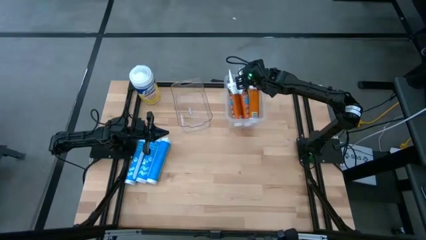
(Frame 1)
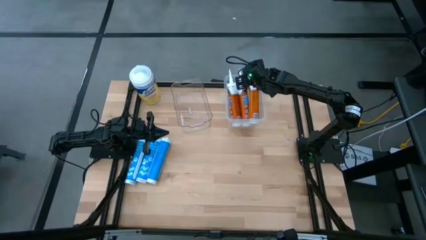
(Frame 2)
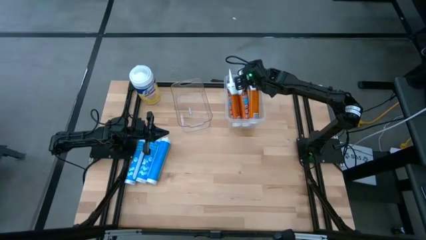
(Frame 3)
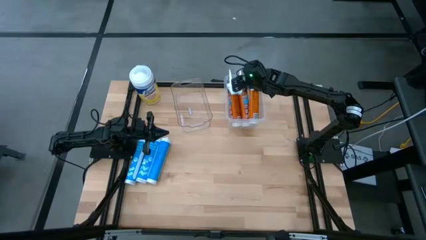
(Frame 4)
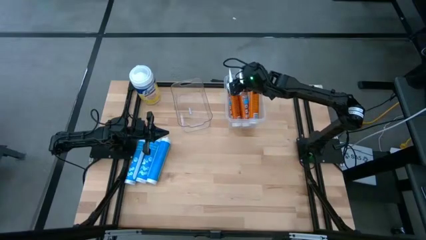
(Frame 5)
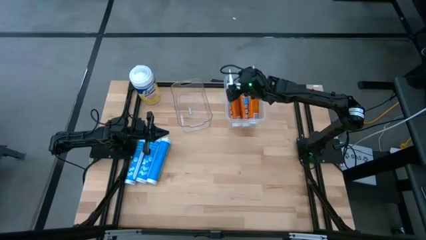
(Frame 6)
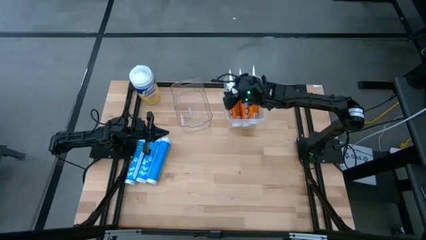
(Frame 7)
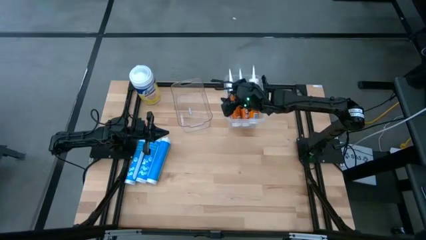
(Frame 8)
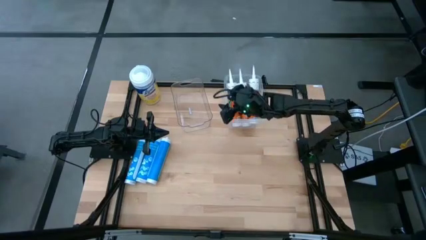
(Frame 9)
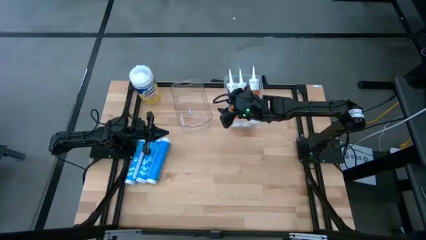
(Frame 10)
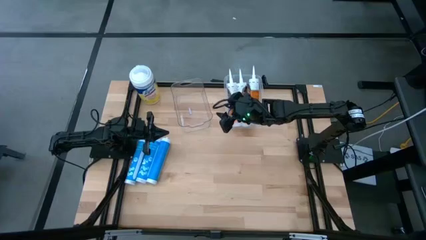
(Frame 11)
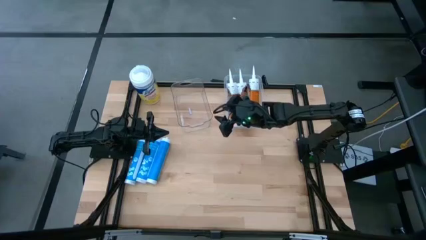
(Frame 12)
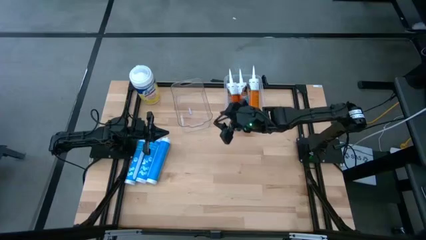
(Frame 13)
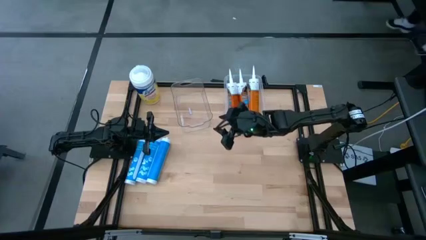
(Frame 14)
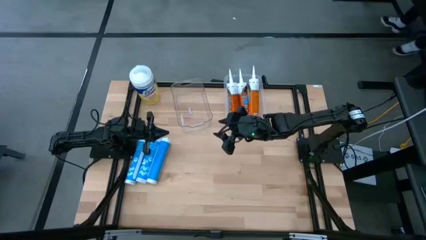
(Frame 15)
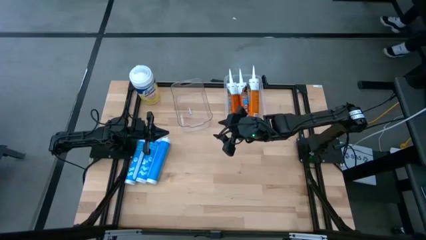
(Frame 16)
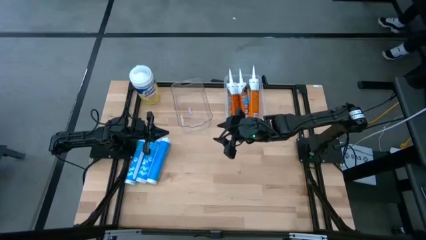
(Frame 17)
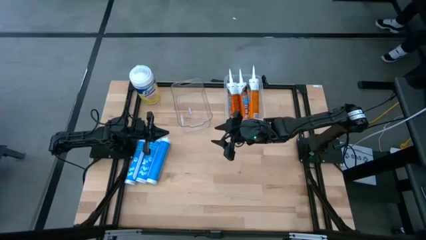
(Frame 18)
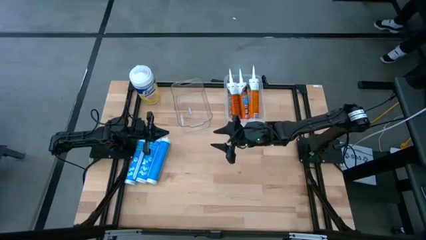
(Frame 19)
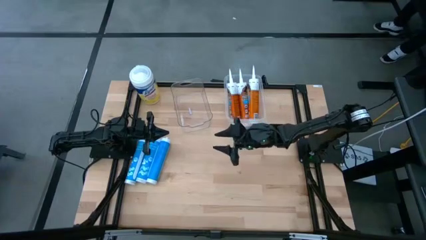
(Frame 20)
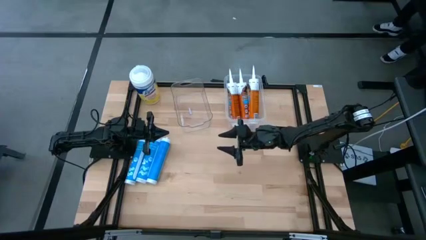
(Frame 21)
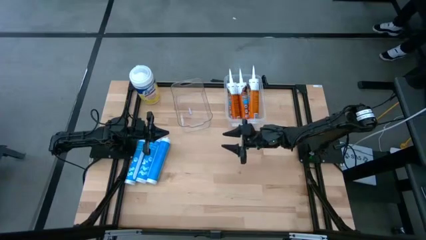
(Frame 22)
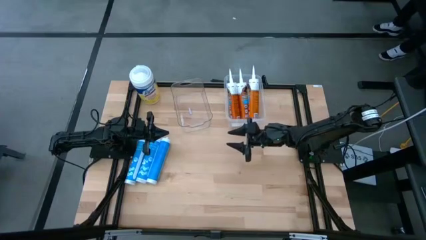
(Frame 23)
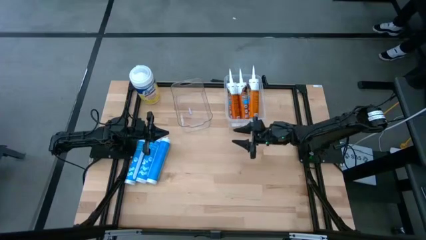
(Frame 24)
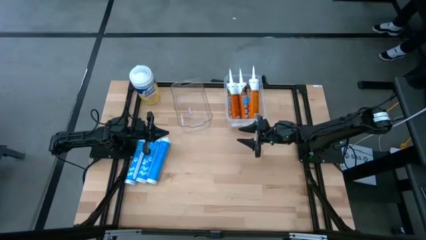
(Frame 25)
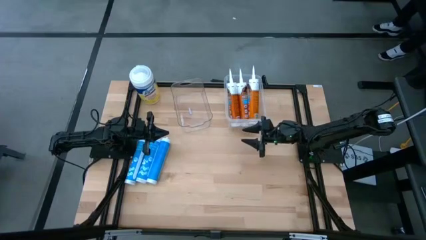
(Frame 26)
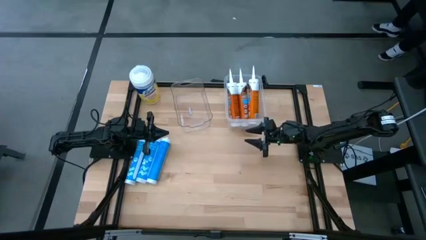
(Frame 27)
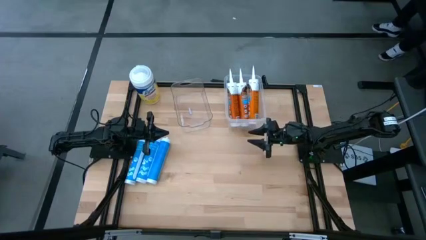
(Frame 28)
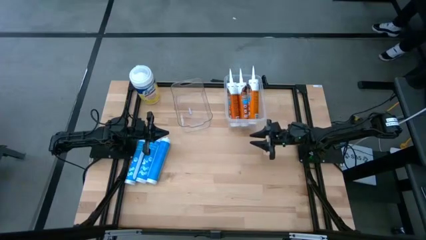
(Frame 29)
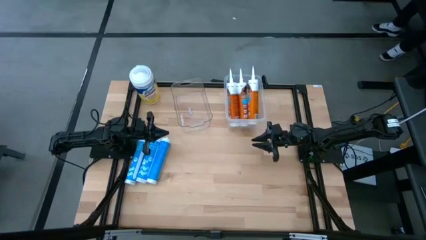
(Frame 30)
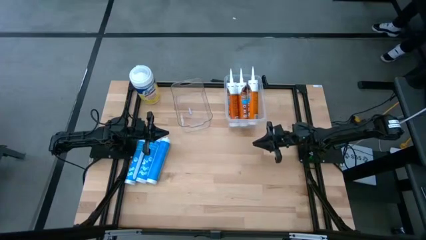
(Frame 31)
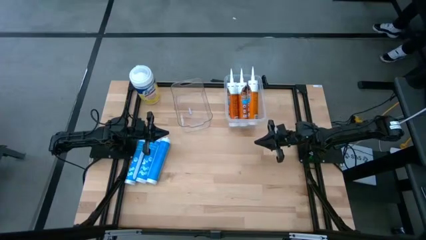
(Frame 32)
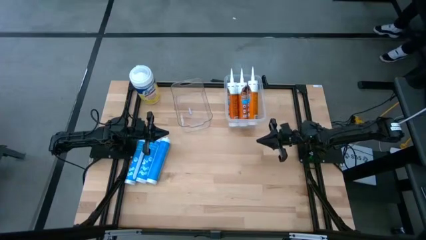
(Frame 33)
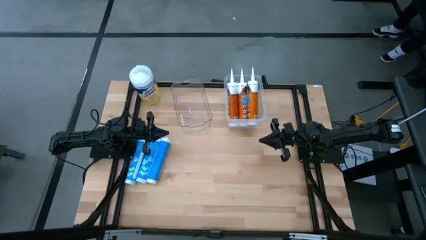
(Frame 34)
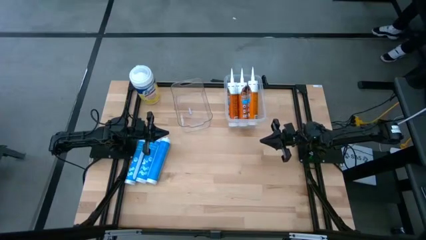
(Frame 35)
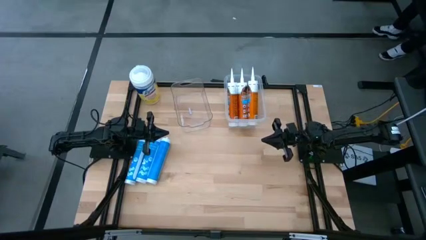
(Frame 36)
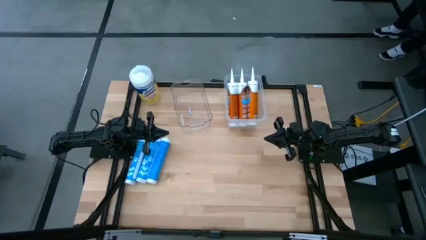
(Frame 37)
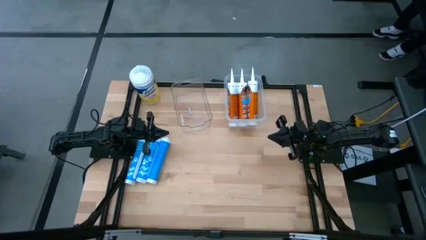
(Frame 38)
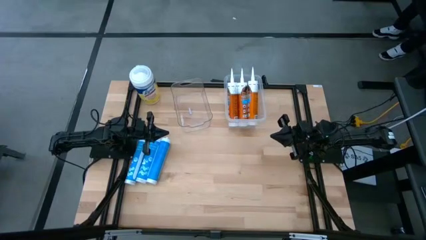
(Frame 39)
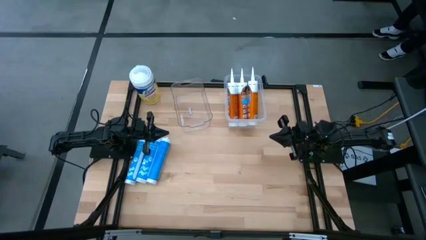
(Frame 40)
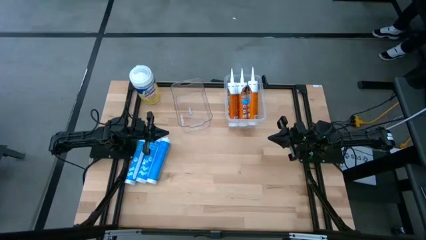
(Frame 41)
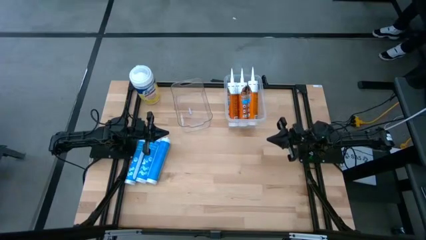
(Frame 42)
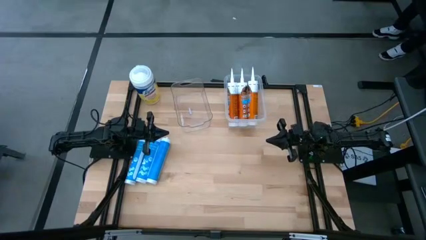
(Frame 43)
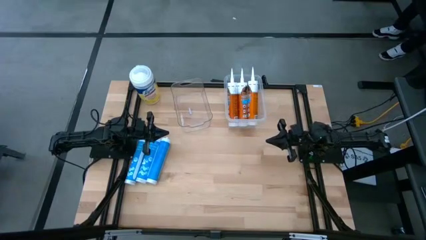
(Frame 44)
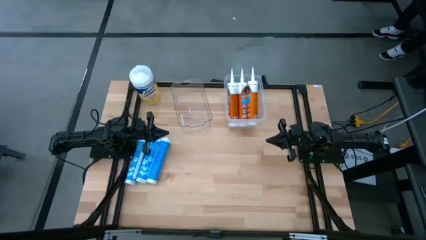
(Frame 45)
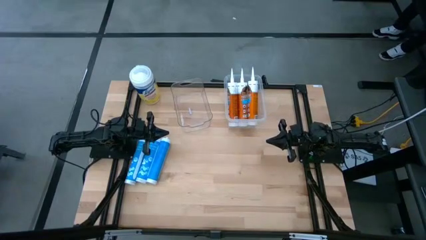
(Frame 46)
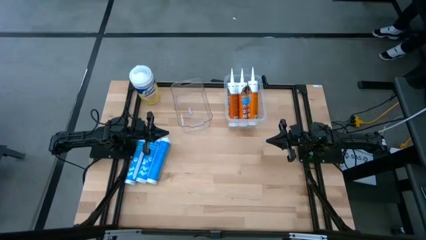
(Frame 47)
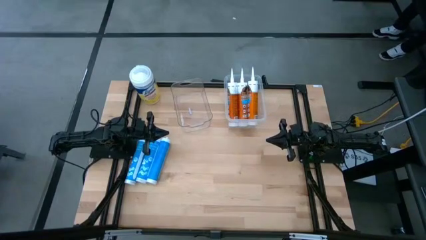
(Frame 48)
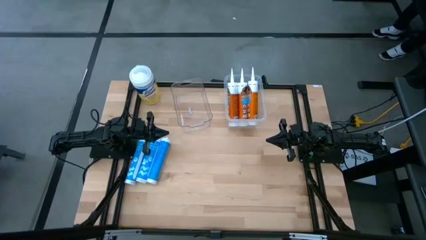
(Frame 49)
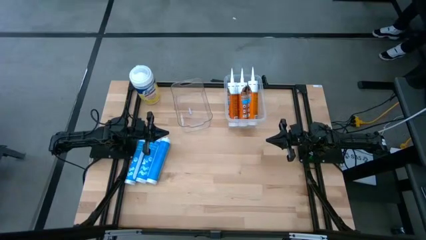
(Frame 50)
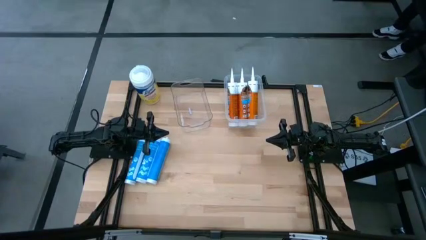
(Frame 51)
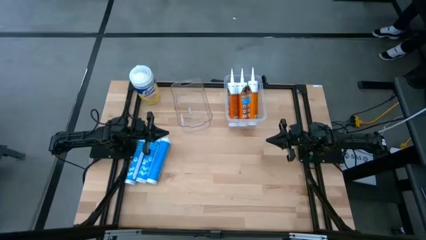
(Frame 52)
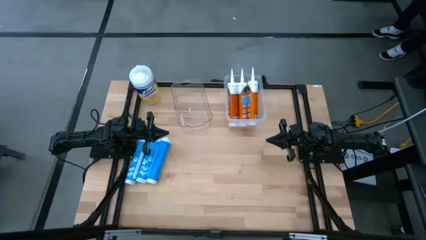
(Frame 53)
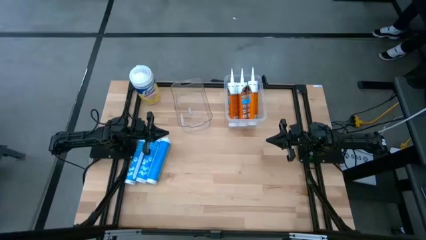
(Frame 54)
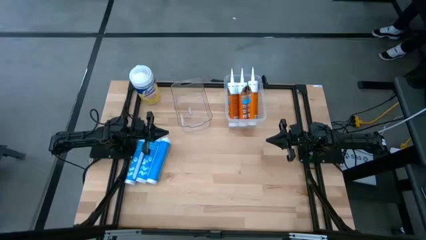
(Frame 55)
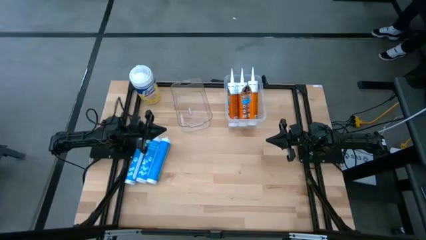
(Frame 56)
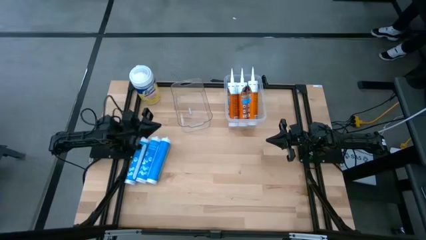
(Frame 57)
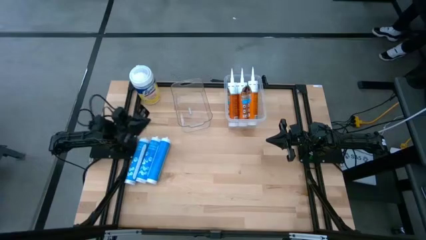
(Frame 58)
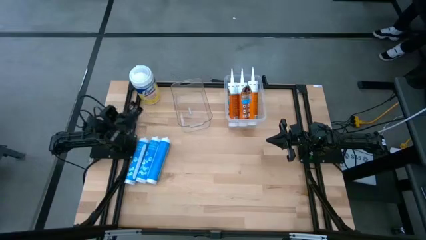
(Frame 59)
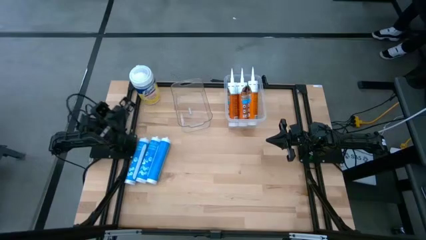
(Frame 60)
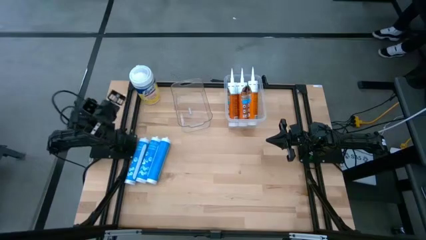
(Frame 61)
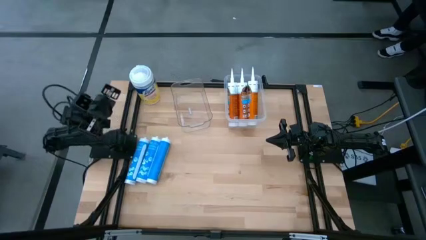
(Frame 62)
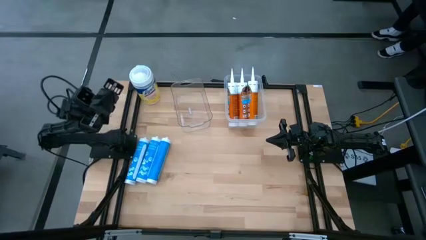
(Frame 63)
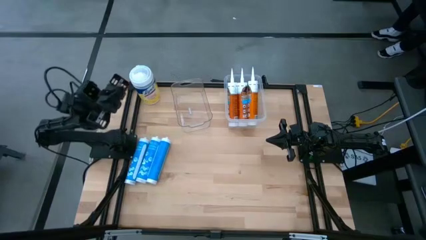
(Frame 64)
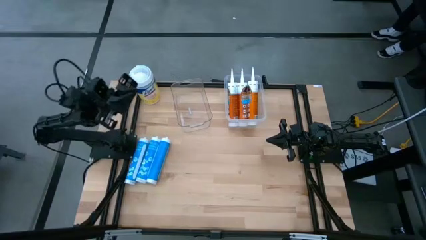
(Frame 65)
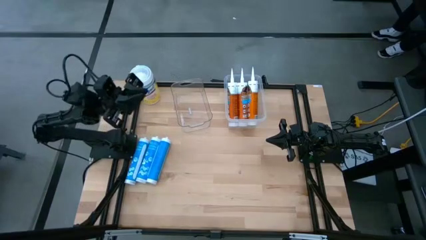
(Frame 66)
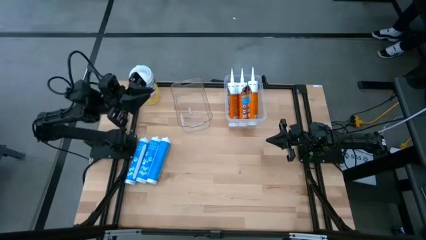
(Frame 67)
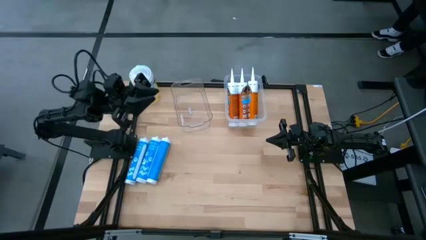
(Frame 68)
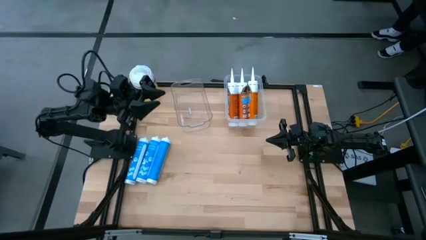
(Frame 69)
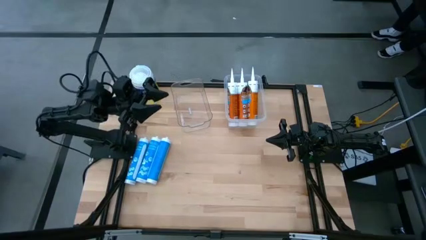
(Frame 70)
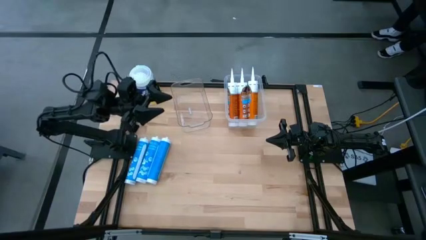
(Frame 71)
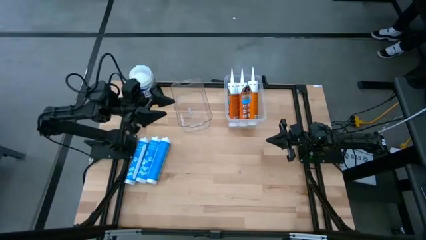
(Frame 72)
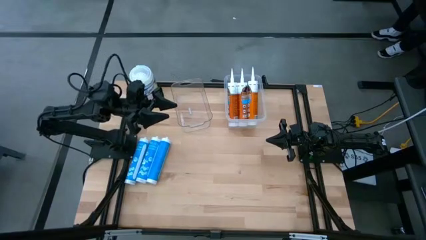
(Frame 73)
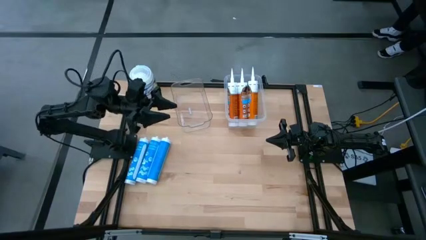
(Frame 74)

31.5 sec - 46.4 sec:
Task: Pick & place silicon tubes, Sealant and Lysol wipes
Put the left blue sealant into the left transparent bin
